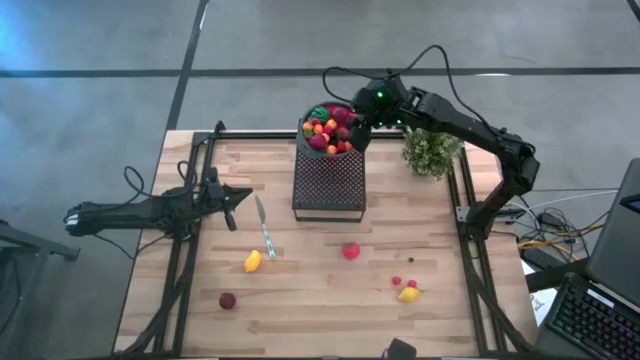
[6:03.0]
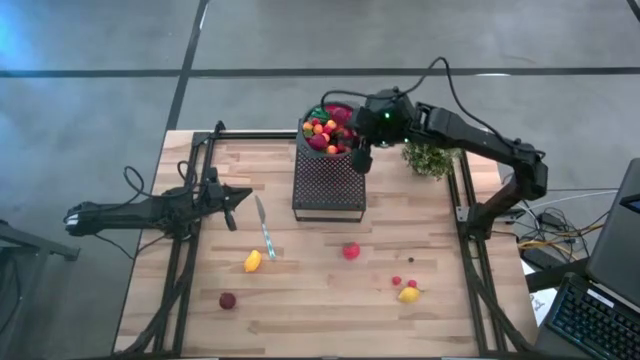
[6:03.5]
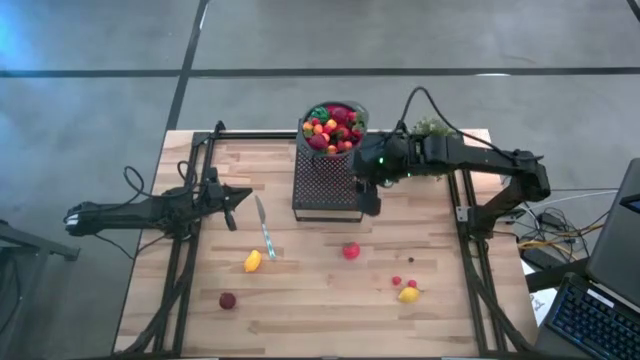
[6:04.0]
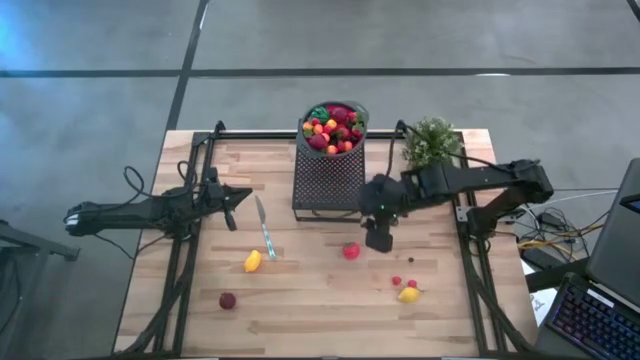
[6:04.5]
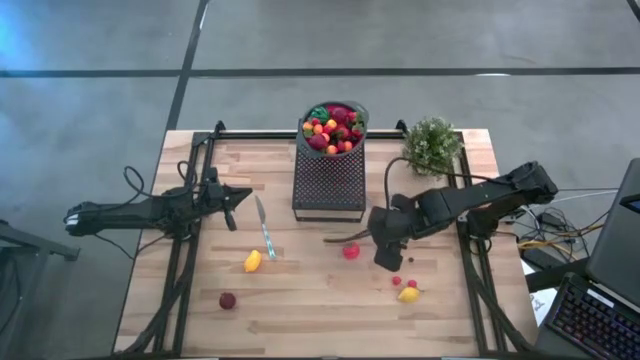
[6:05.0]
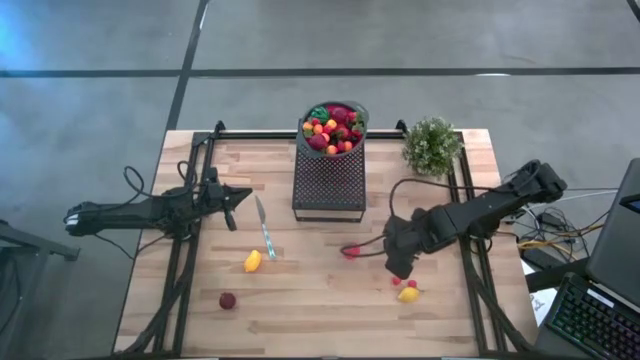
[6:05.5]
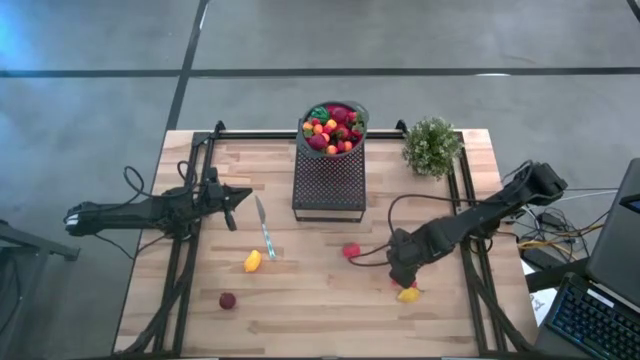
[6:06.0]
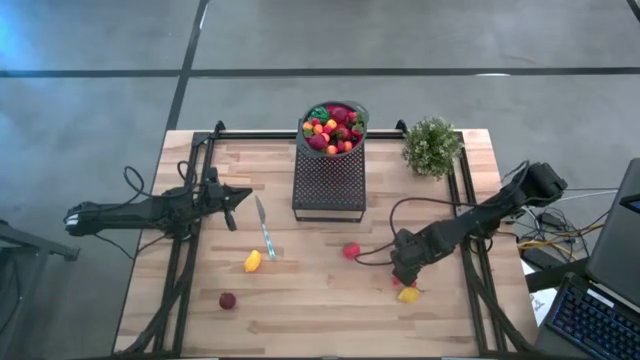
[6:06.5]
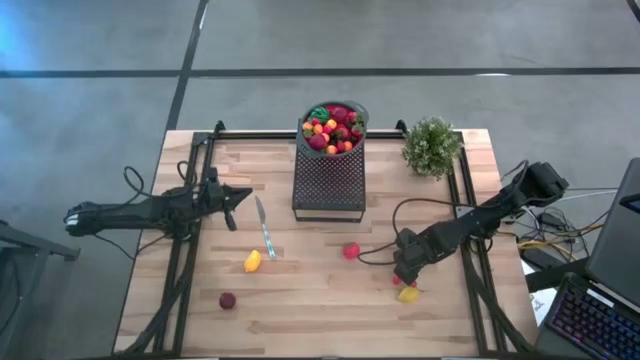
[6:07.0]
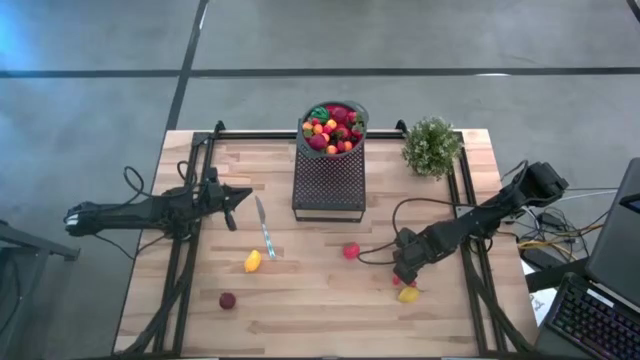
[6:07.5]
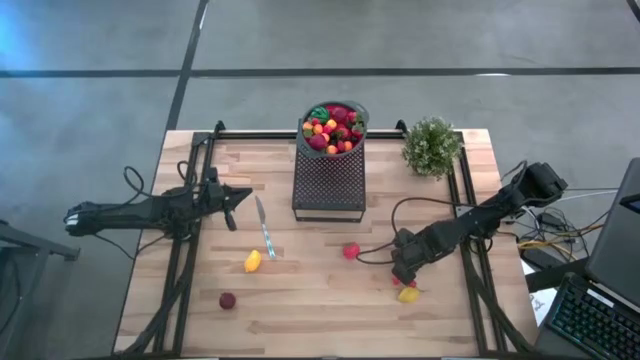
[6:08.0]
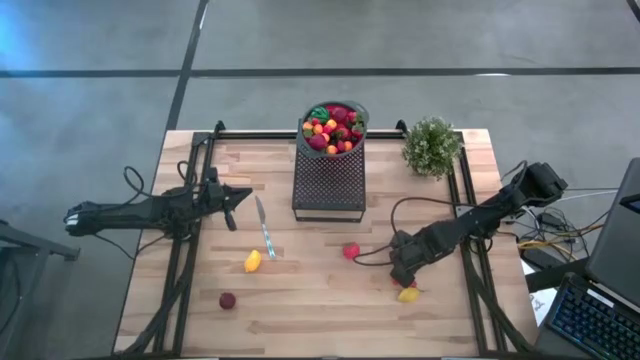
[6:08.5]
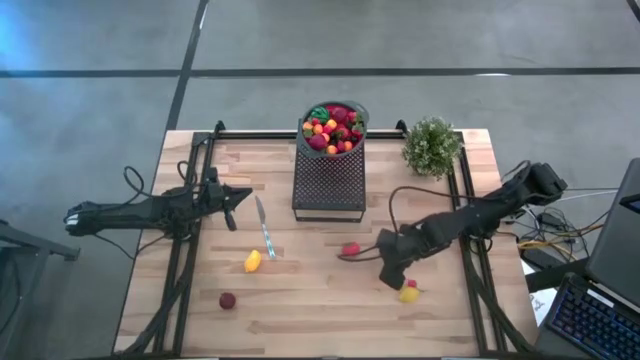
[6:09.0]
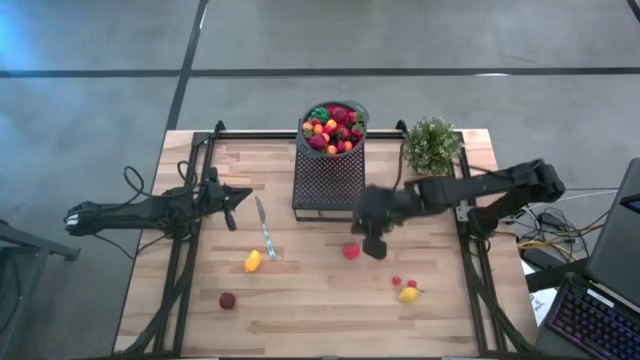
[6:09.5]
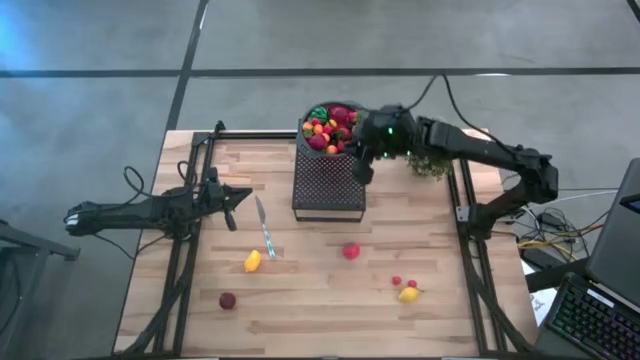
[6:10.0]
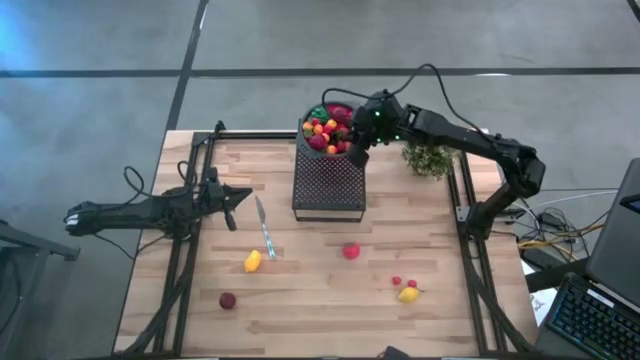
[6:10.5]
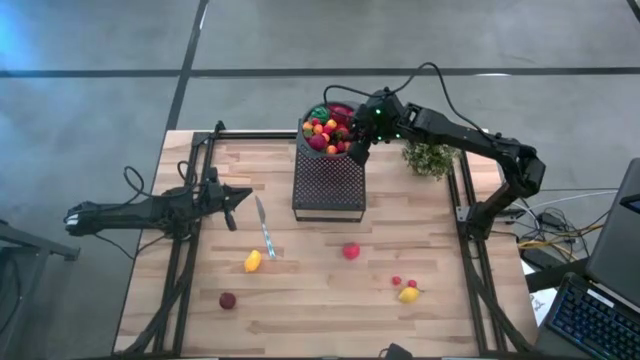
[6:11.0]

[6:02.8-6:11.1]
Task: Pick & Place Fruit
Put the blueberry into the strainer bowl on the shelf

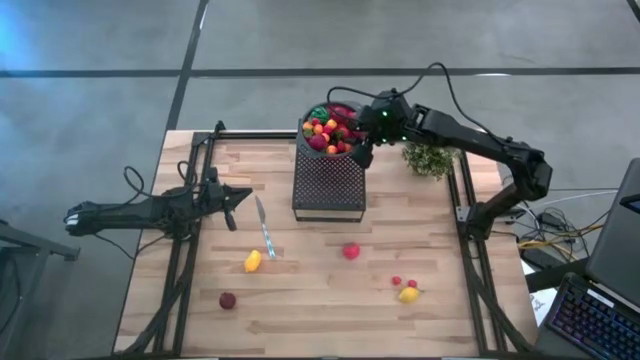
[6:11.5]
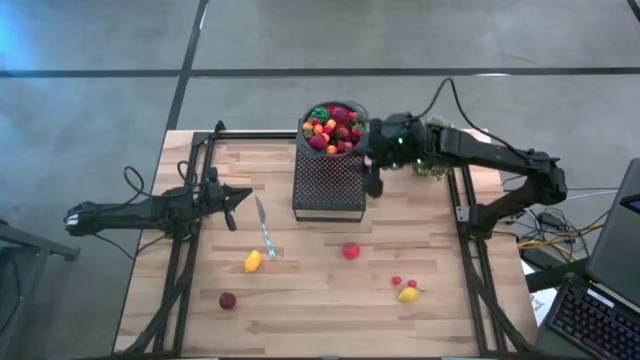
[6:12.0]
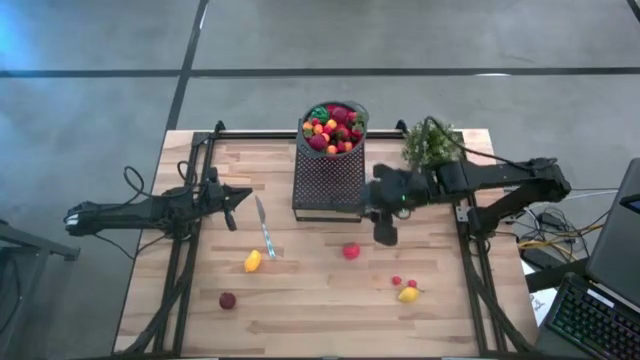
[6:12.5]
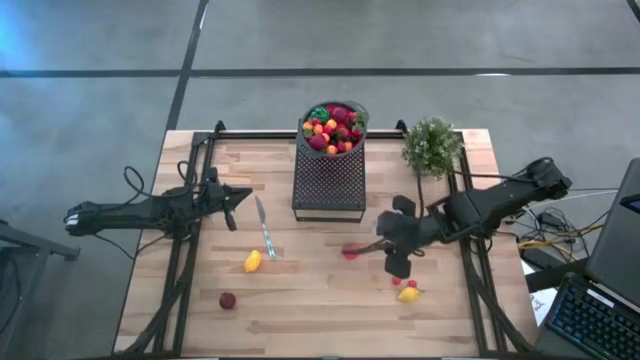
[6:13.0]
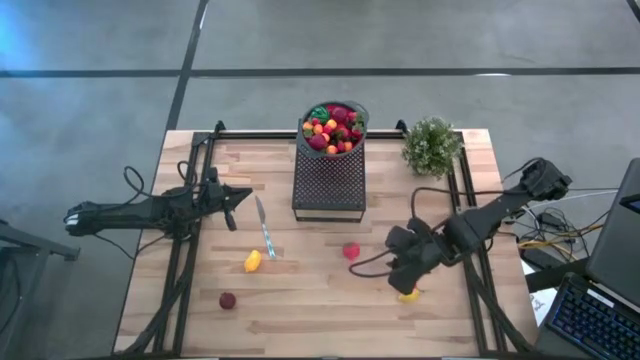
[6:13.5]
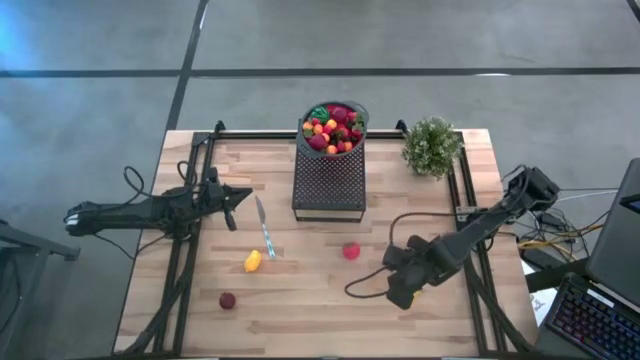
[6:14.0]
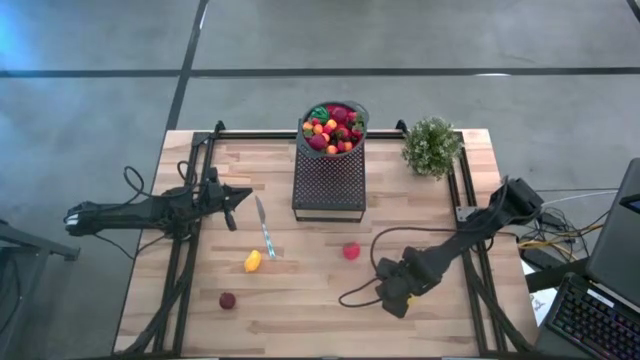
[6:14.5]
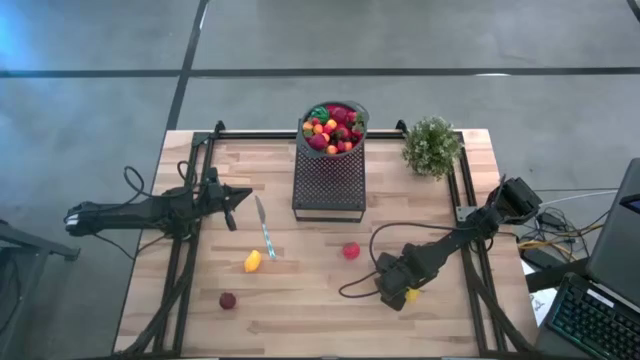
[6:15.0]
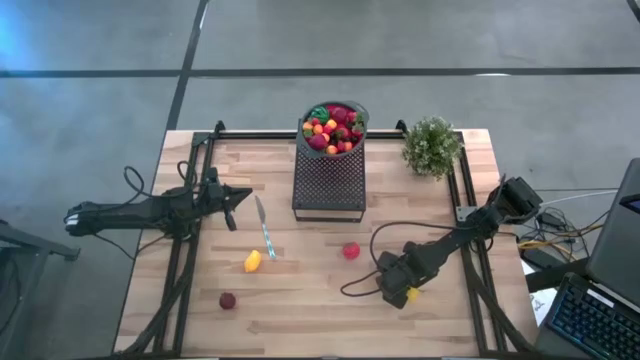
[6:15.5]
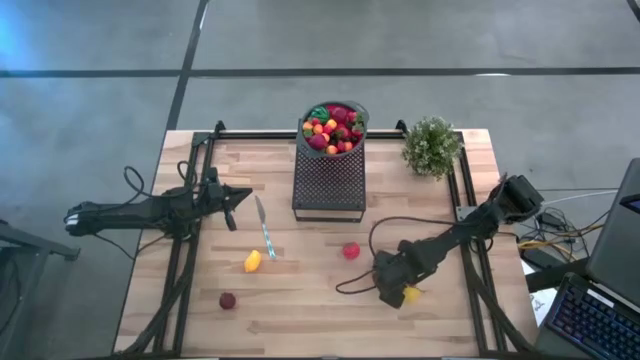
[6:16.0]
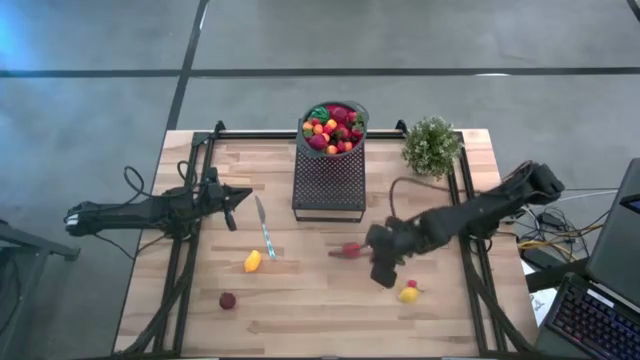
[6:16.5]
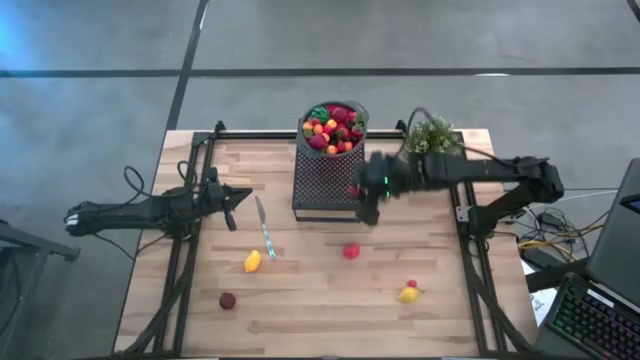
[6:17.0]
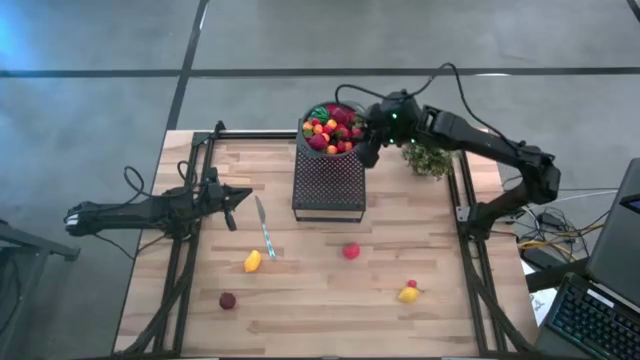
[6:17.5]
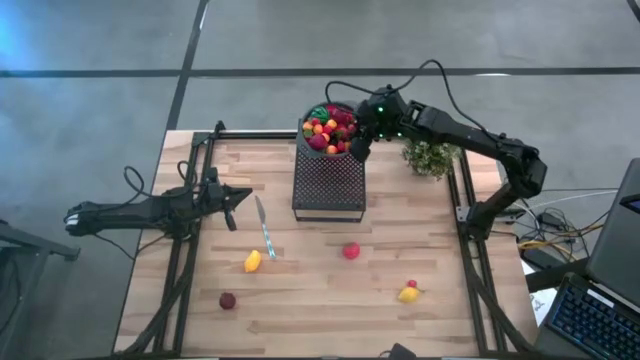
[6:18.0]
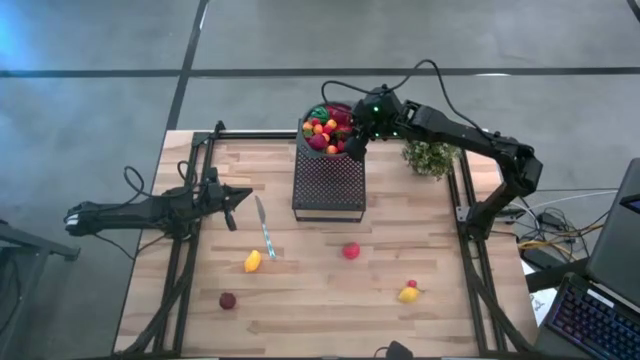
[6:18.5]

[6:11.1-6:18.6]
Put the left red cherry into the strainer bowl on the shelf

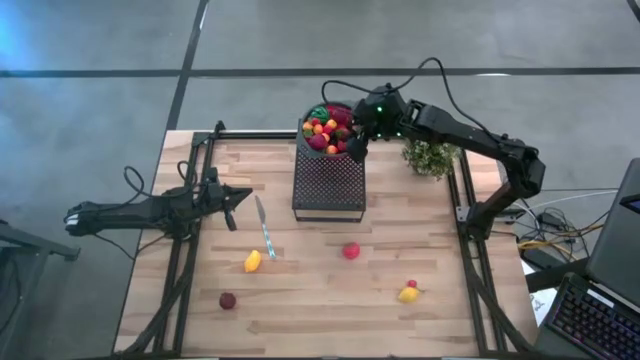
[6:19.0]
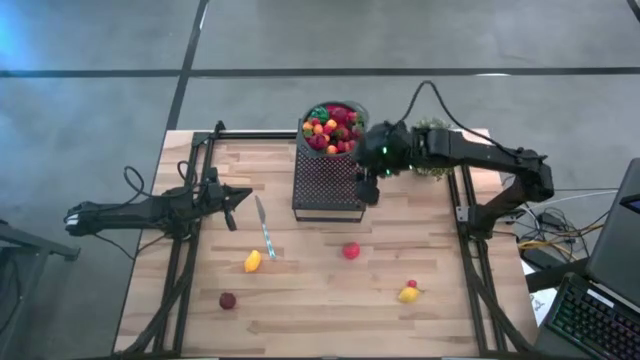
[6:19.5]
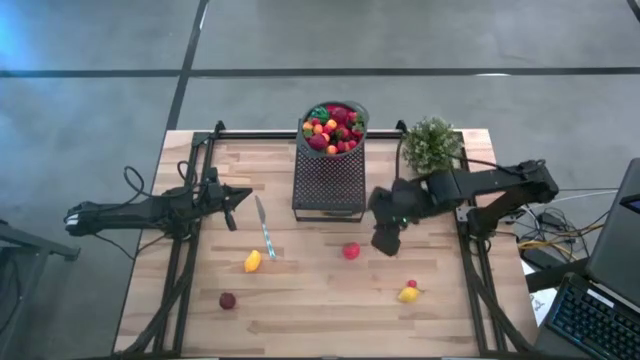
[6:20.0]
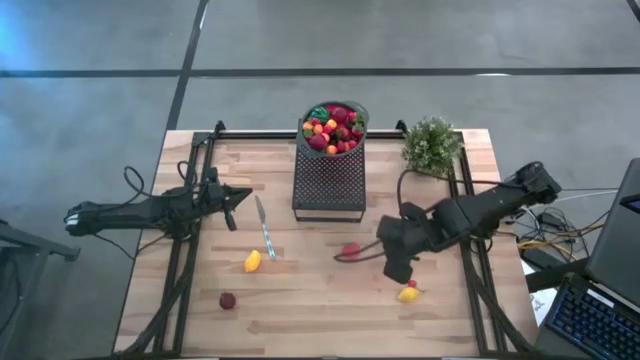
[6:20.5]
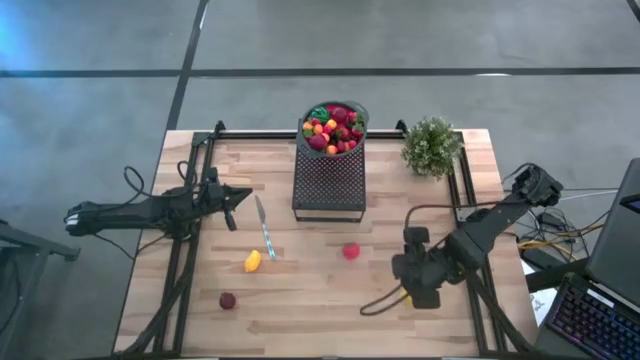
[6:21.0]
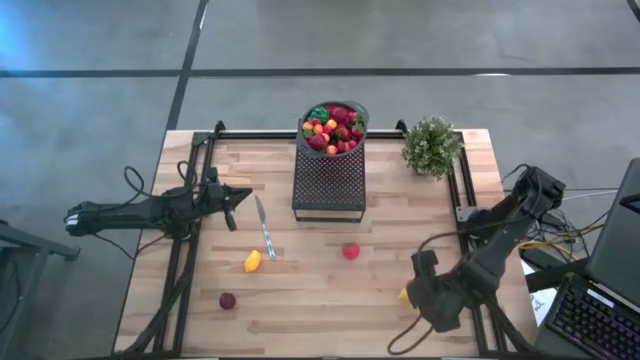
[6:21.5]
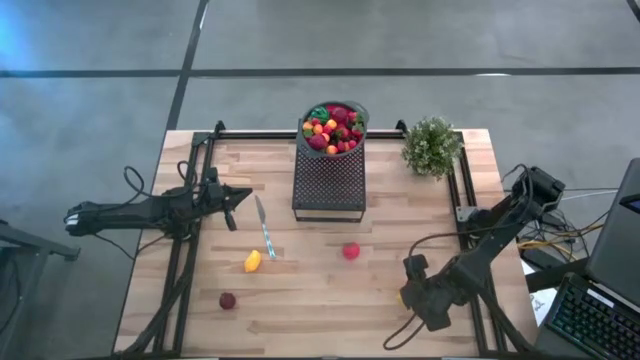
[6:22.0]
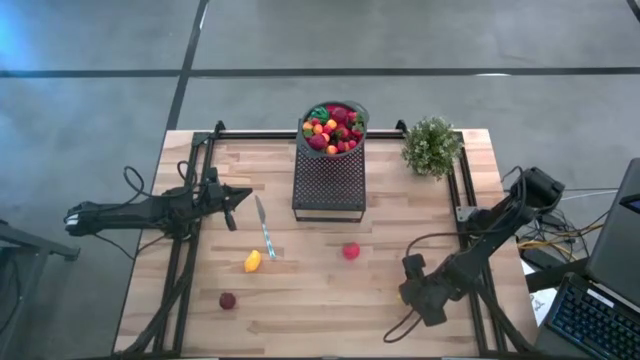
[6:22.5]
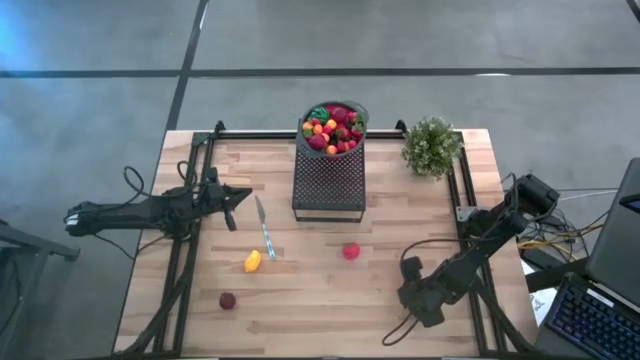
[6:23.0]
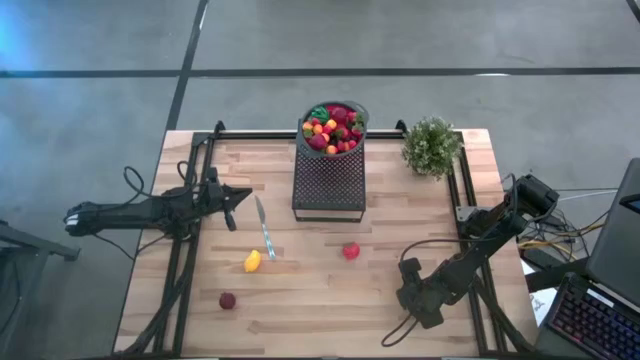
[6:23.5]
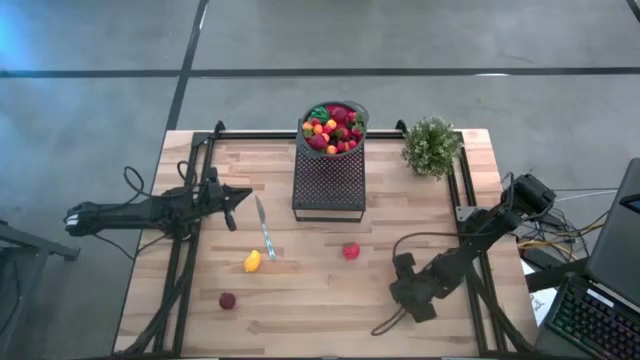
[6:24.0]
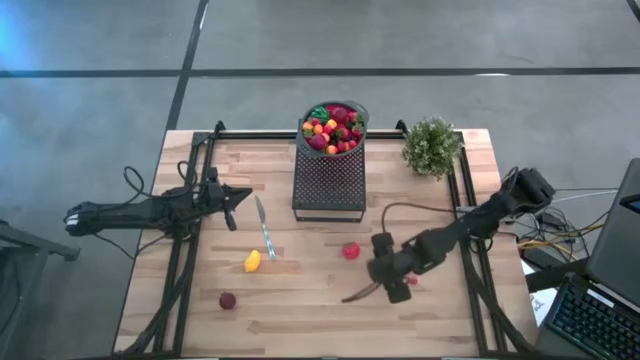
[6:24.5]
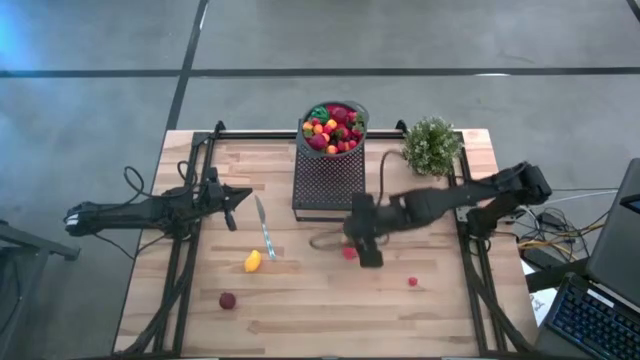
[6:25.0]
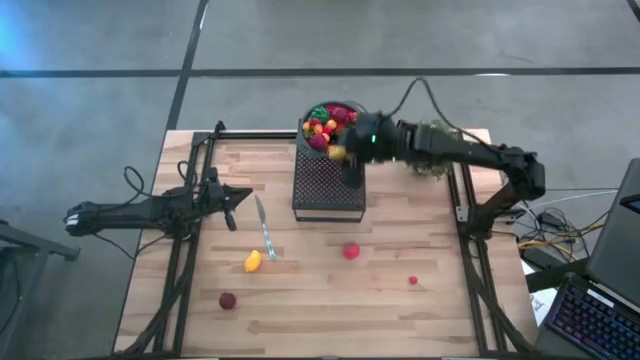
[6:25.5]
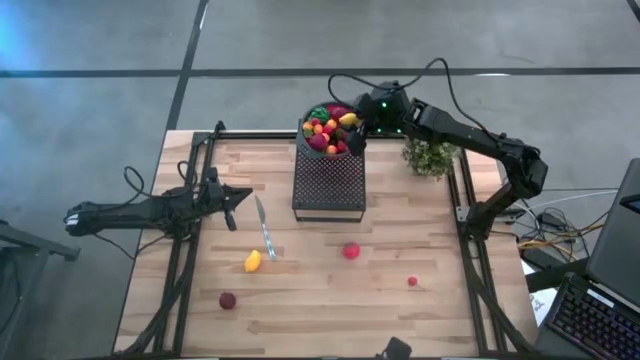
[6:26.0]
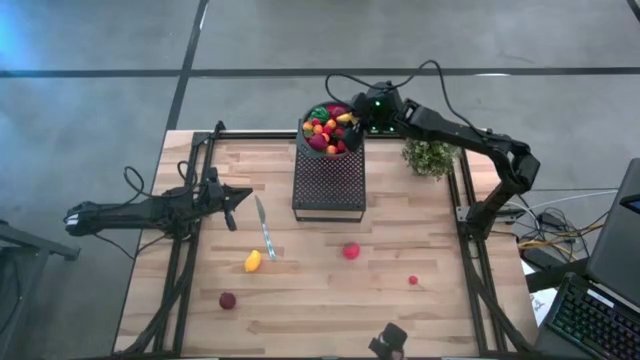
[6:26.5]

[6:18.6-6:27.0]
Put the lemon into the strainer bowl on the shelf
